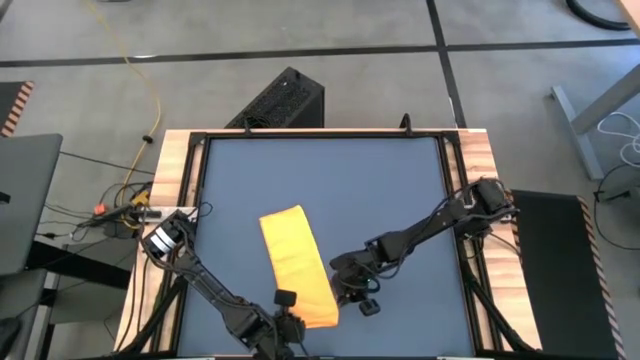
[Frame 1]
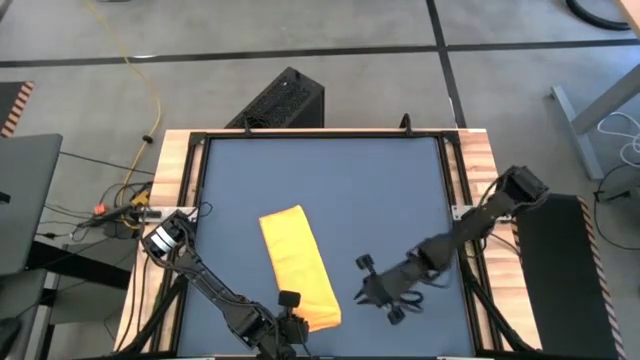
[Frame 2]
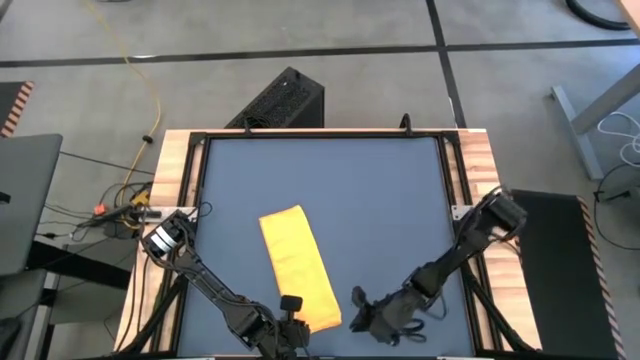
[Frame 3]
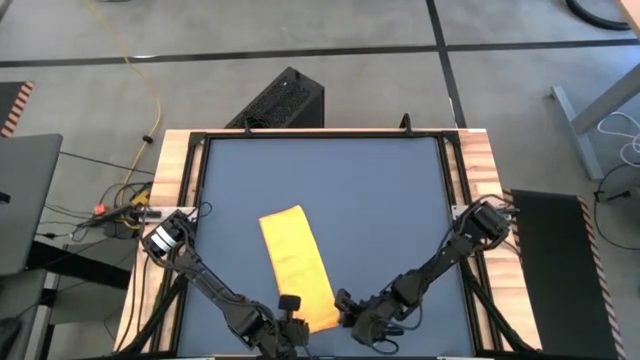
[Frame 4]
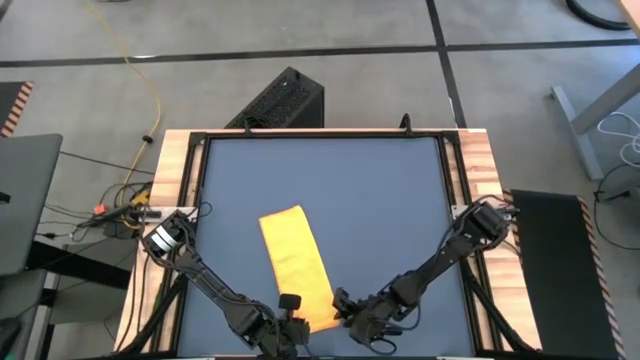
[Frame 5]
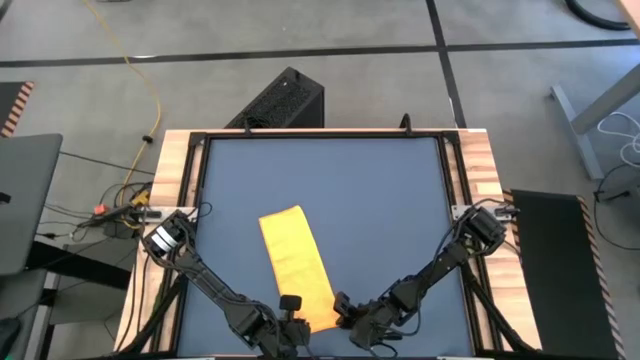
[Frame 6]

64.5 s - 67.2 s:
Task: Roll towel into tight, uniform cylinder
Roll the orange microfiber towel

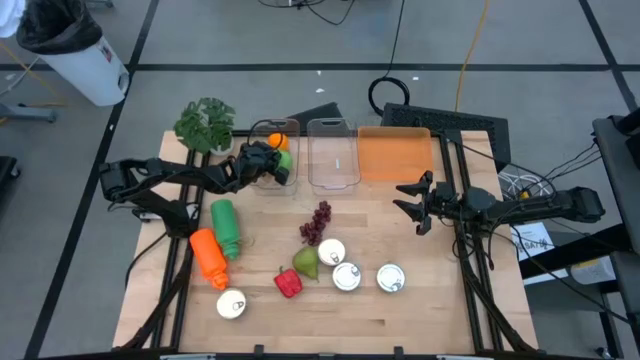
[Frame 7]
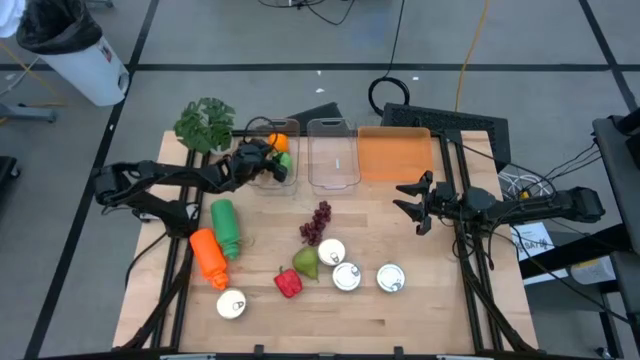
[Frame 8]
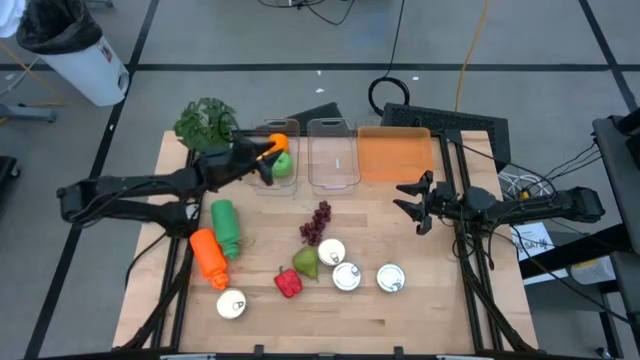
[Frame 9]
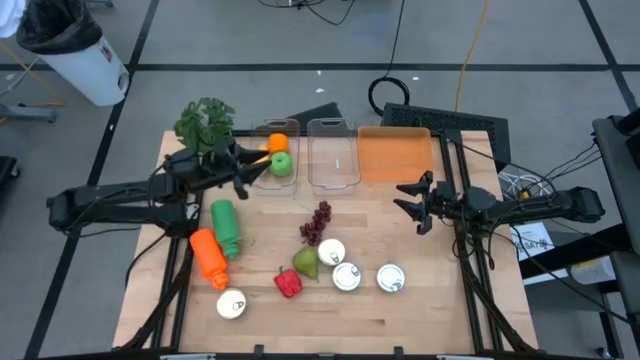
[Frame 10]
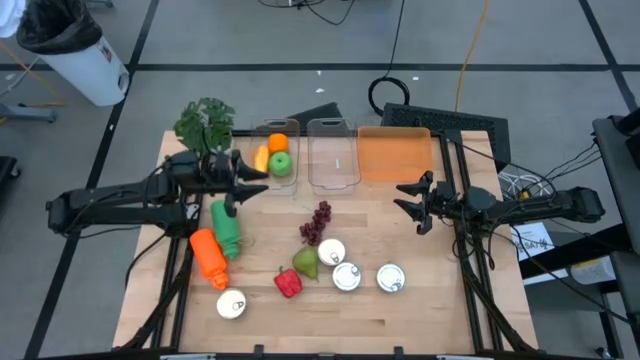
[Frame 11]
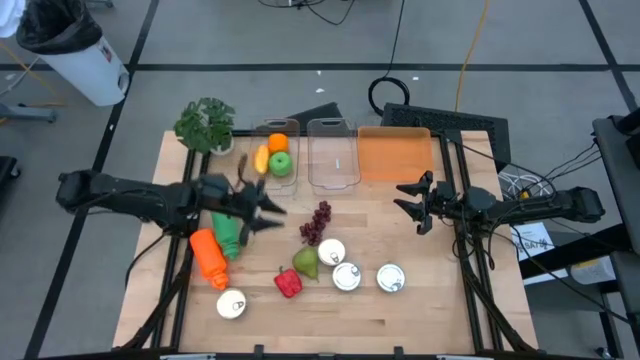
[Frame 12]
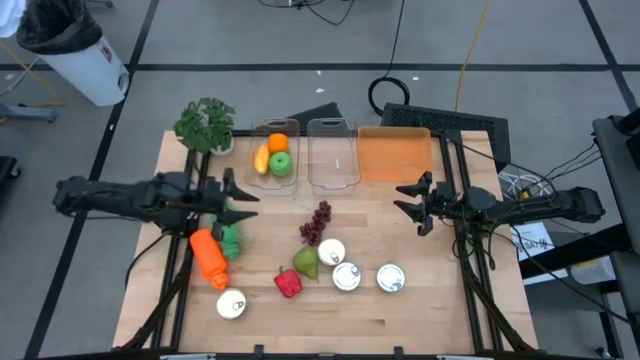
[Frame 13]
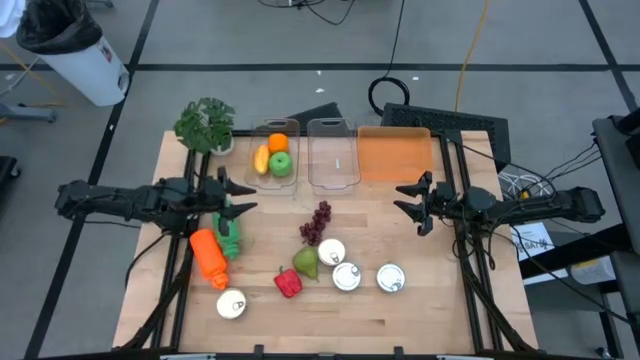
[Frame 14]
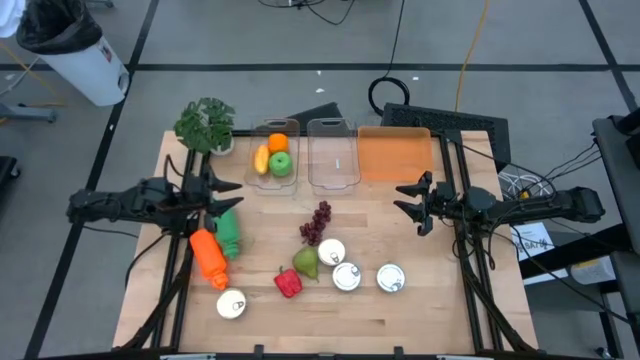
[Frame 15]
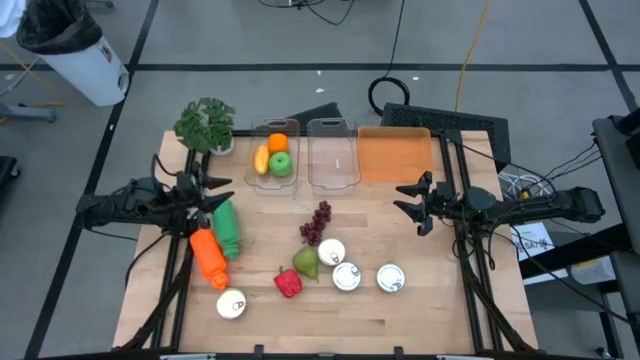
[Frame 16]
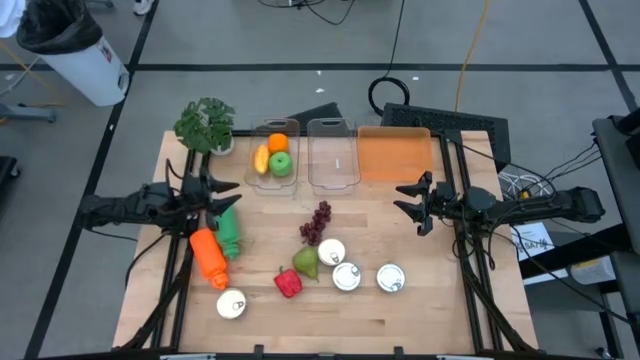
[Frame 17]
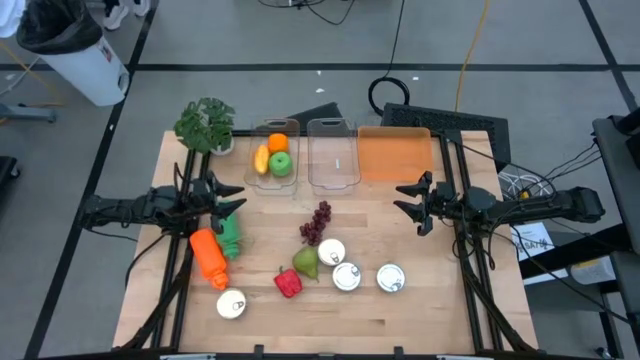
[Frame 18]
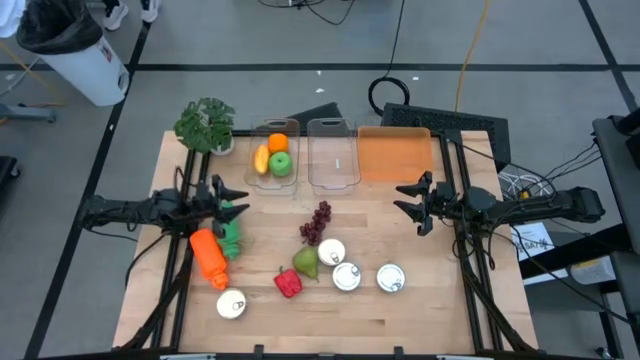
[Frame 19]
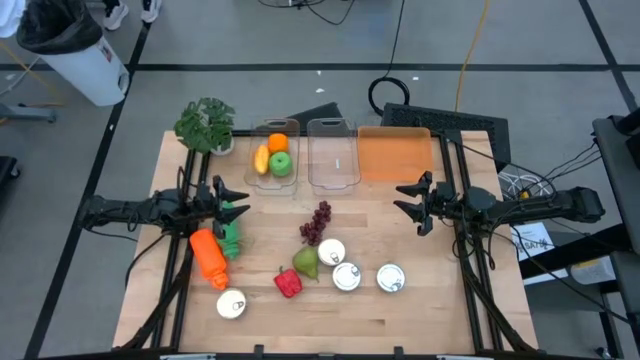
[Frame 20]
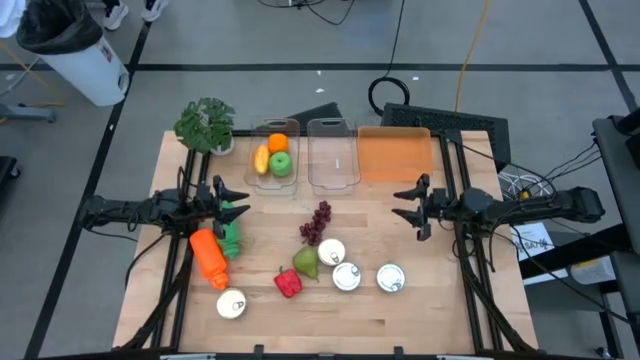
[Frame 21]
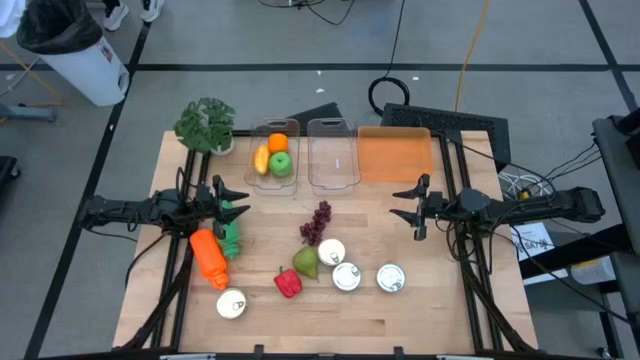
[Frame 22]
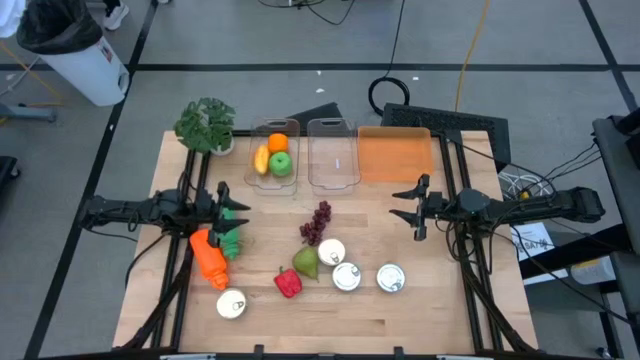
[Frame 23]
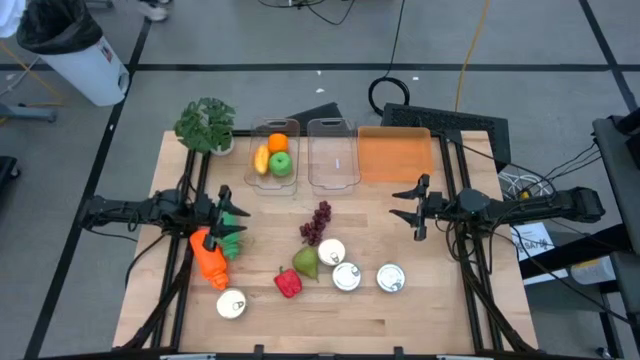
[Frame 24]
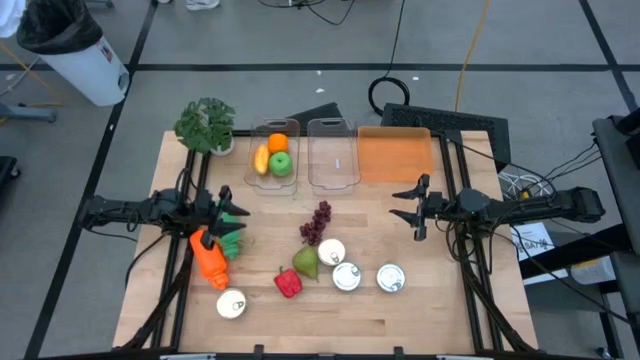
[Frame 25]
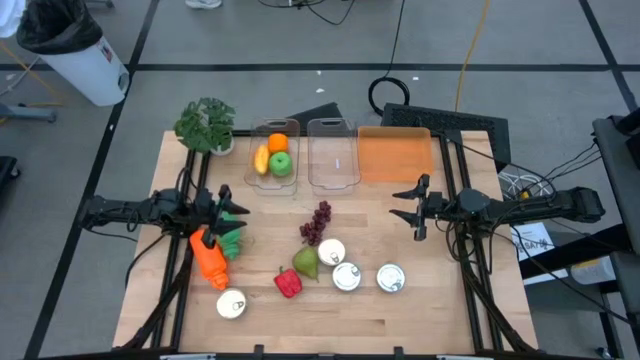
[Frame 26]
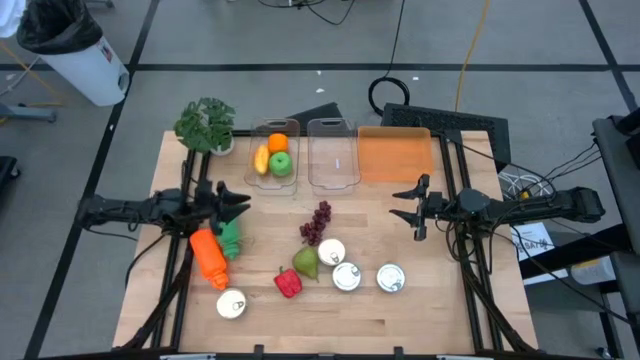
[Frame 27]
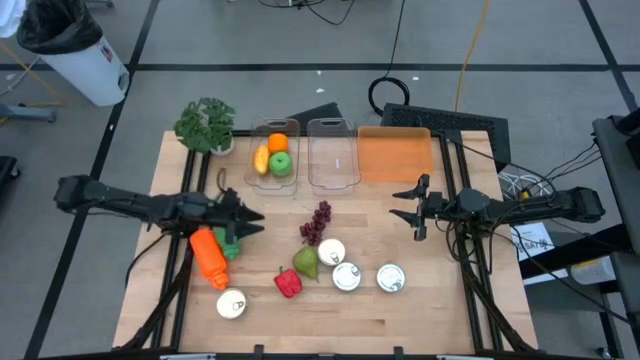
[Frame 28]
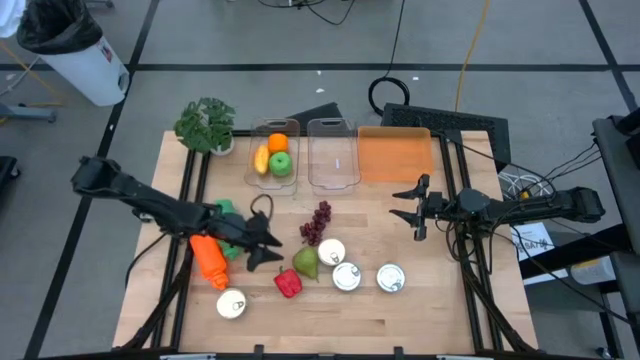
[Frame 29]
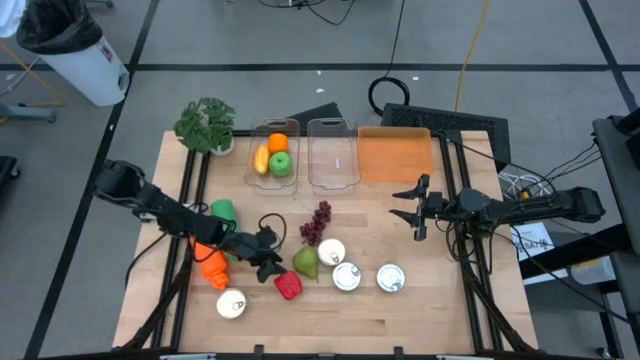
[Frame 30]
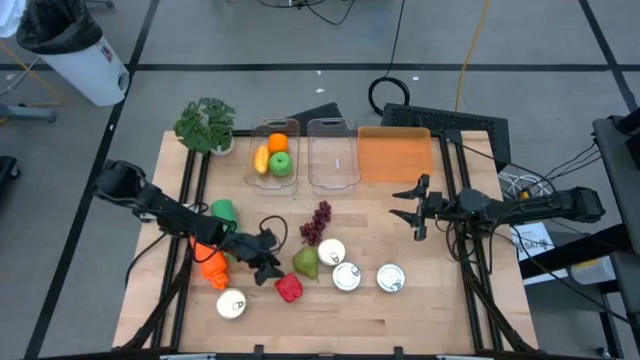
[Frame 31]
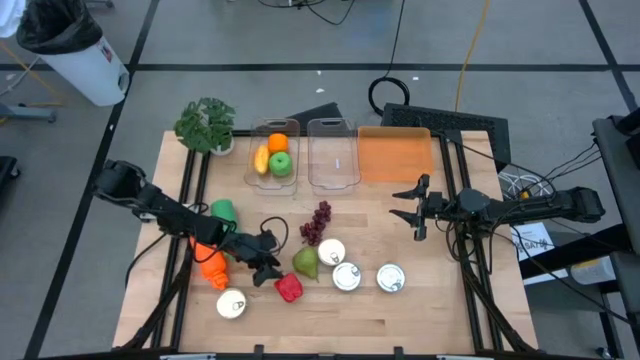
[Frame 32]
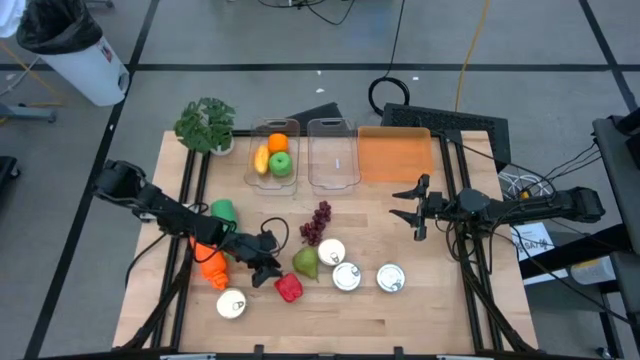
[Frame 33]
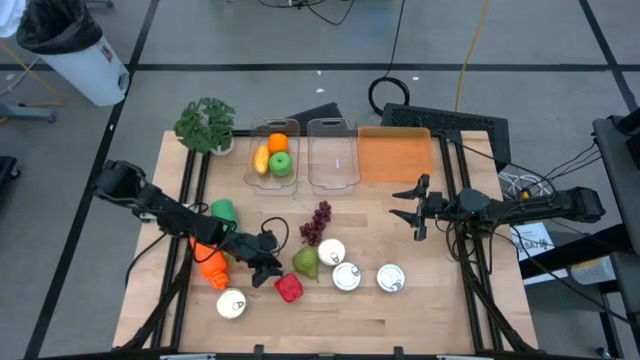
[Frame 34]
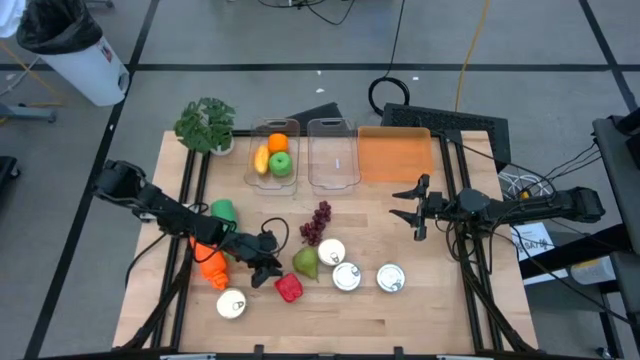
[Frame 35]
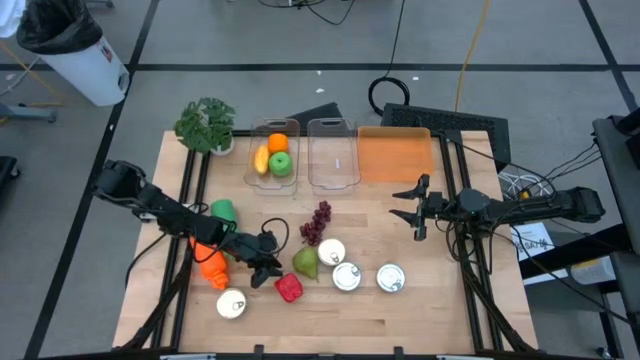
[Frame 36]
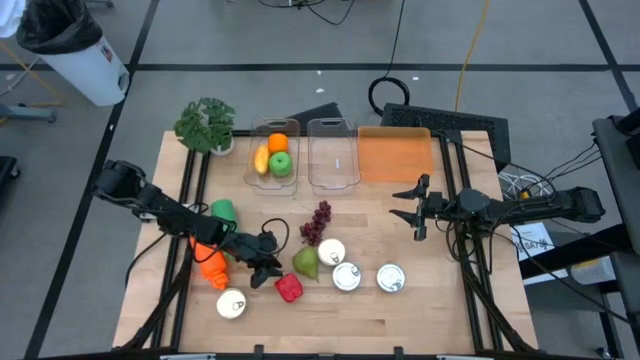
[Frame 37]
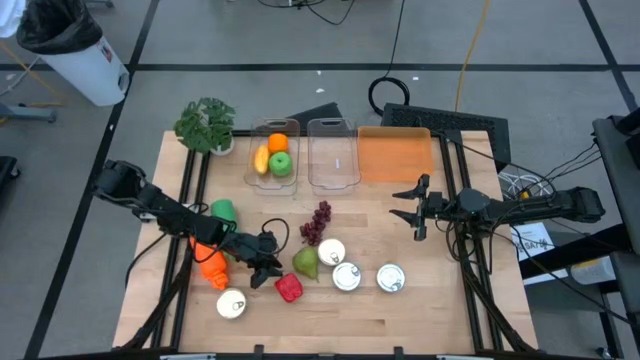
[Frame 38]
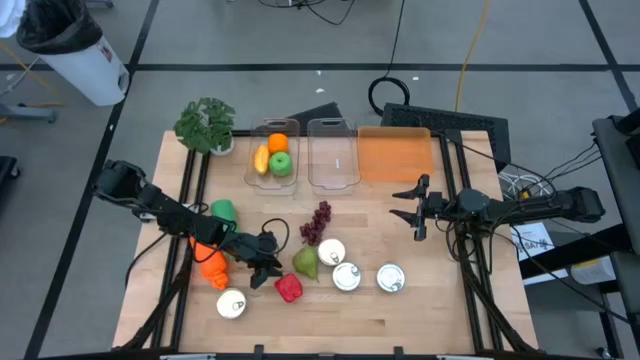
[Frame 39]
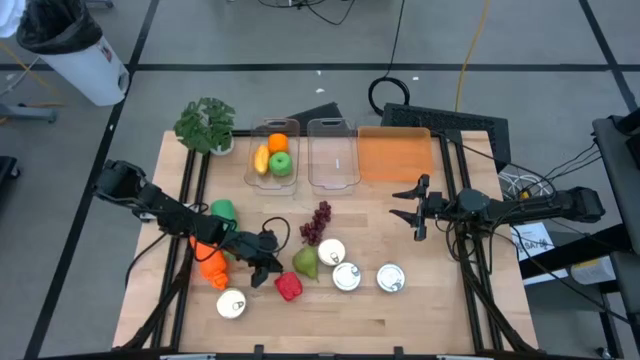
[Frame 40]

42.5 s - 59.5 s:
Task: Pick & Place Food Item
Put the red bell pepper into the left transparent bin
